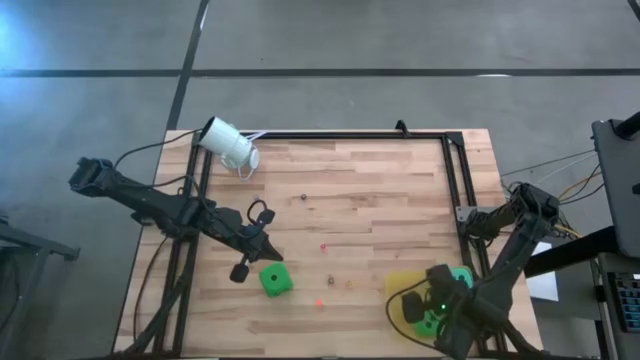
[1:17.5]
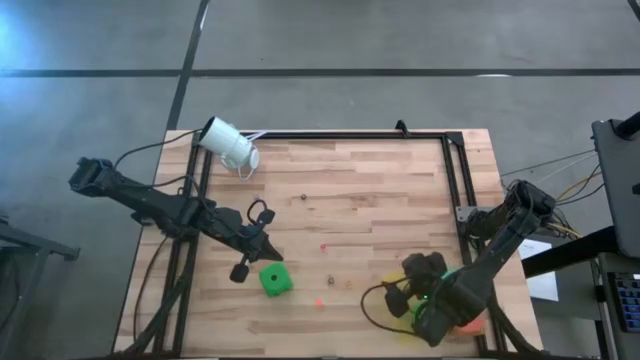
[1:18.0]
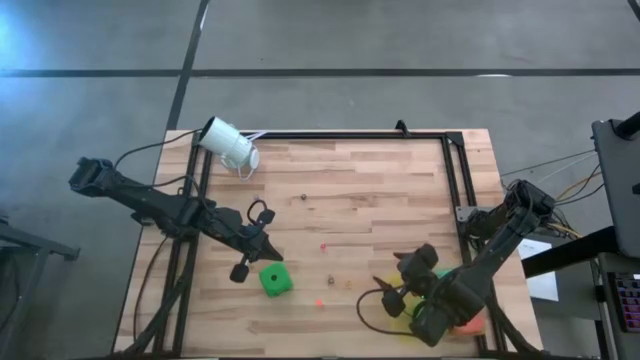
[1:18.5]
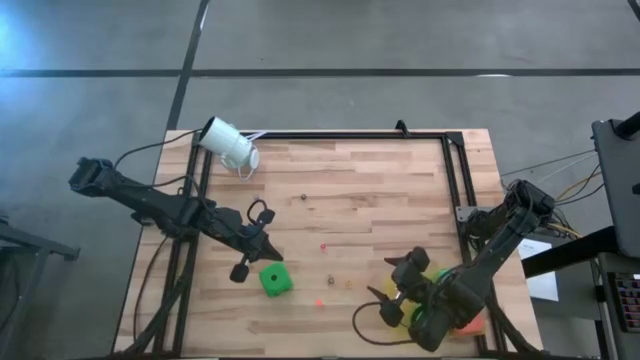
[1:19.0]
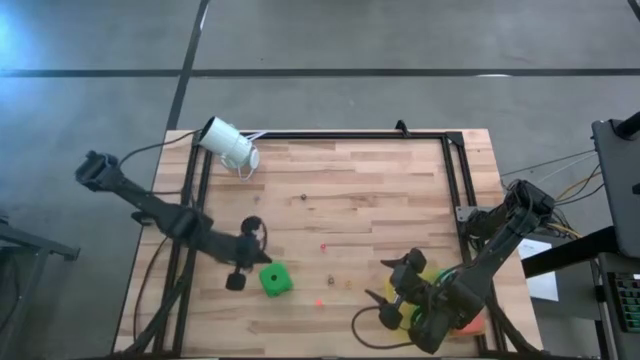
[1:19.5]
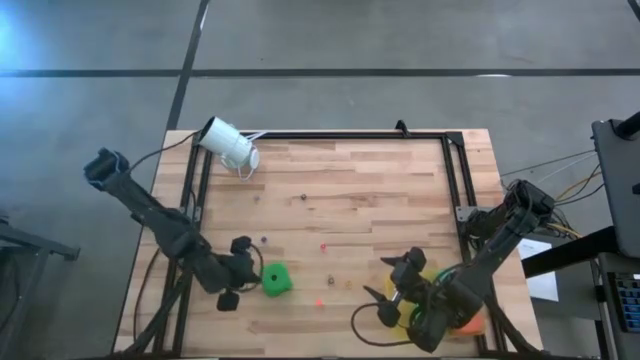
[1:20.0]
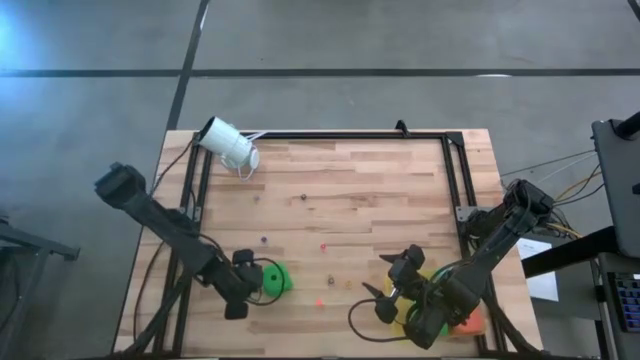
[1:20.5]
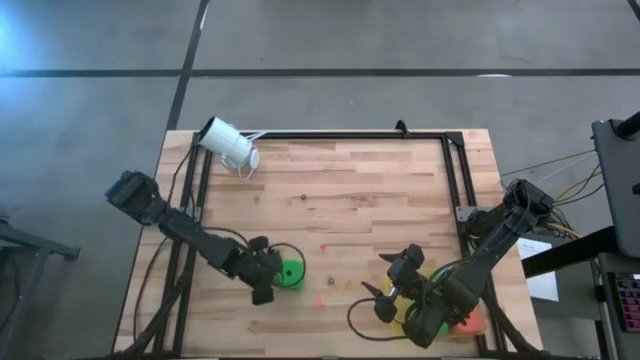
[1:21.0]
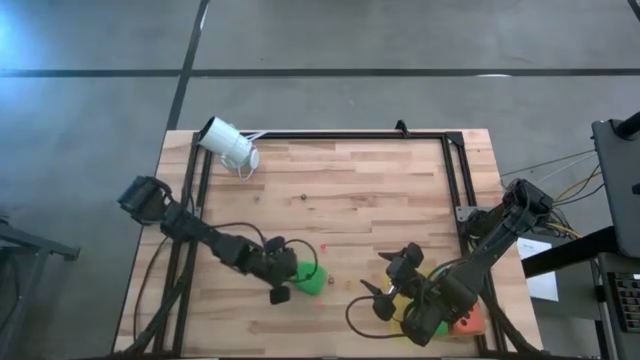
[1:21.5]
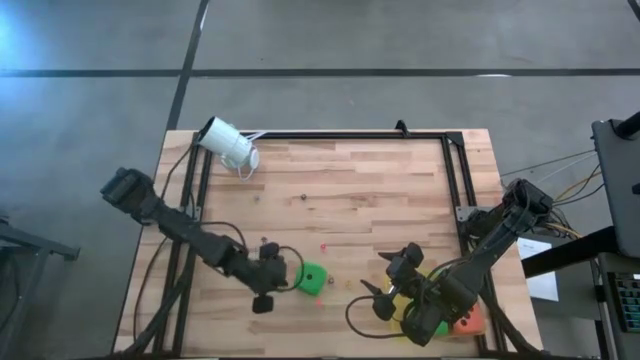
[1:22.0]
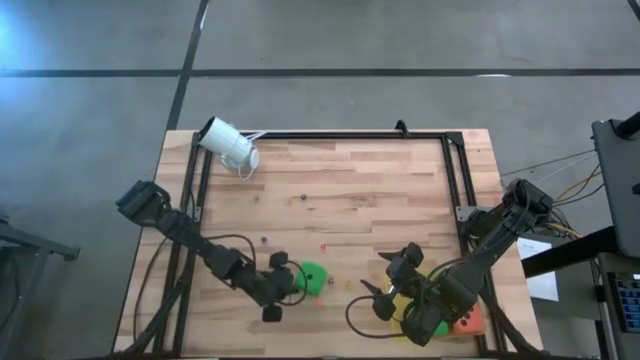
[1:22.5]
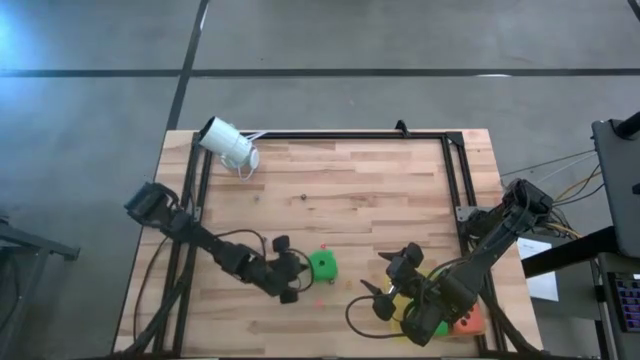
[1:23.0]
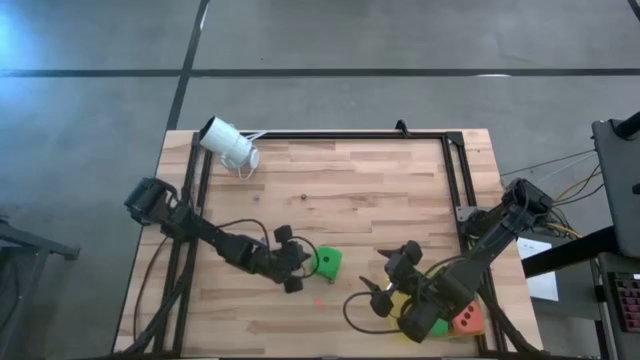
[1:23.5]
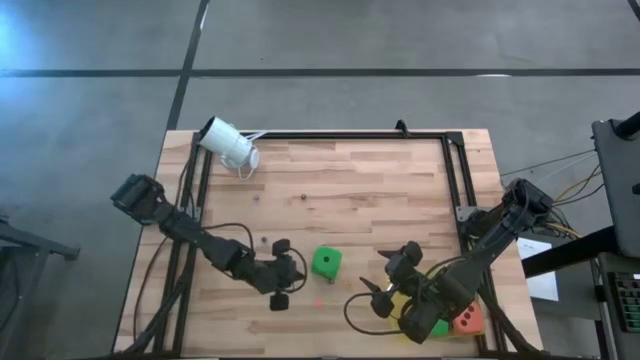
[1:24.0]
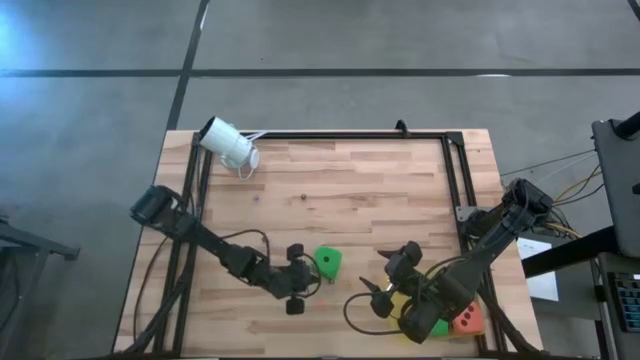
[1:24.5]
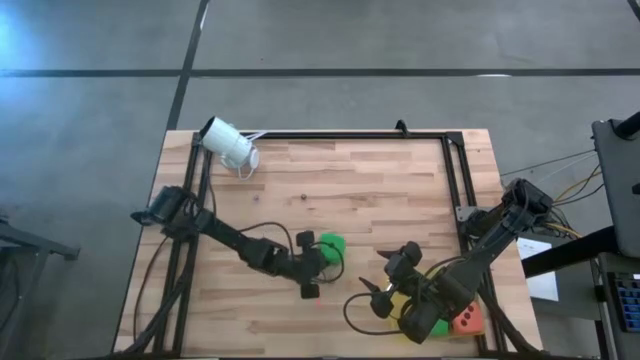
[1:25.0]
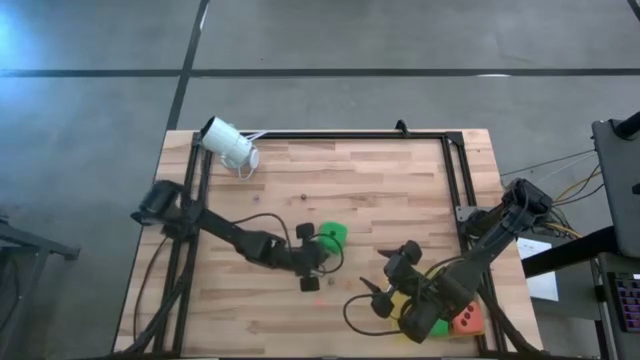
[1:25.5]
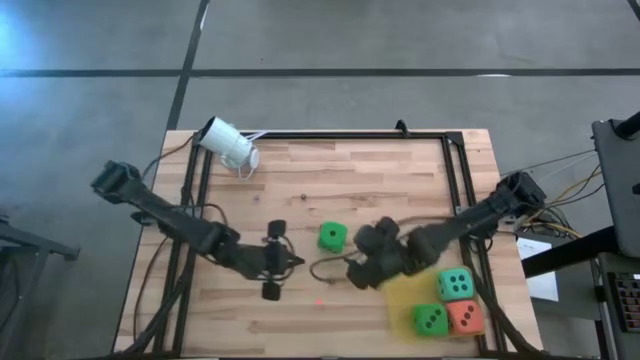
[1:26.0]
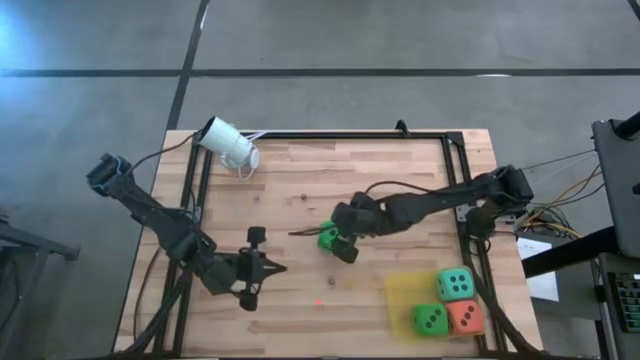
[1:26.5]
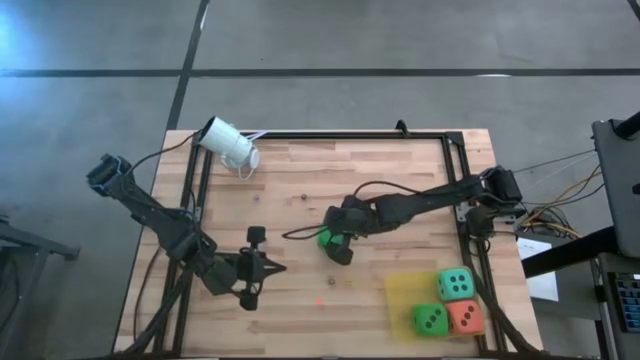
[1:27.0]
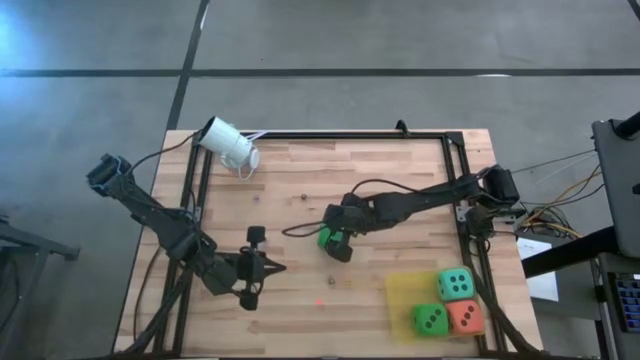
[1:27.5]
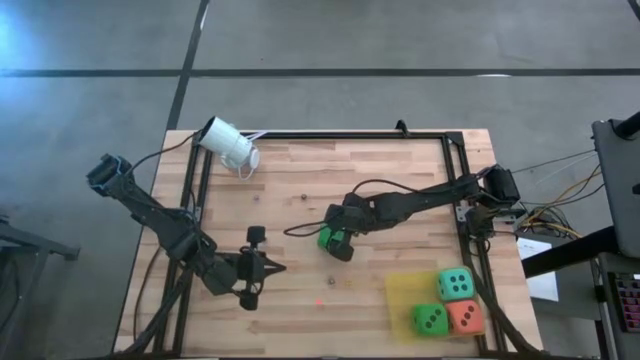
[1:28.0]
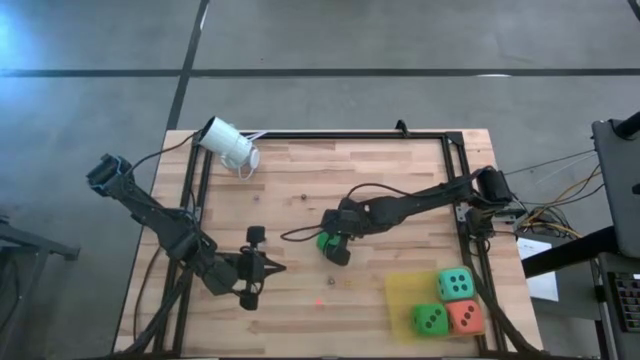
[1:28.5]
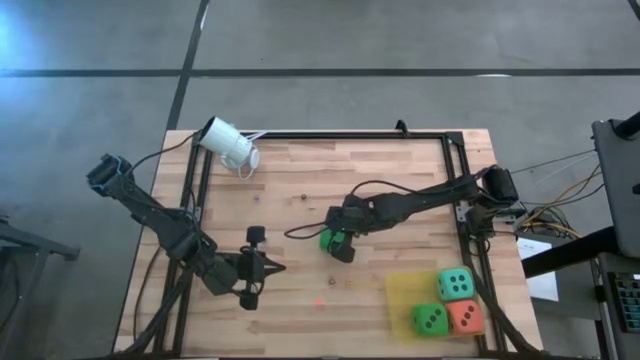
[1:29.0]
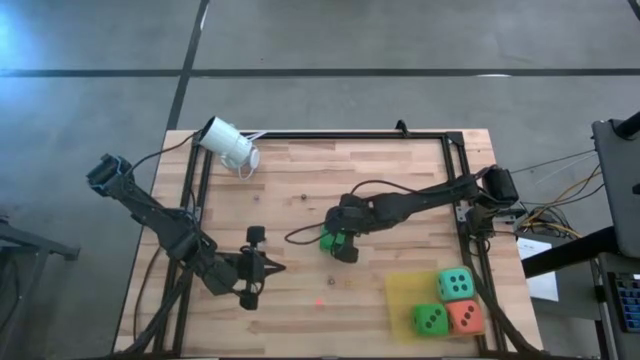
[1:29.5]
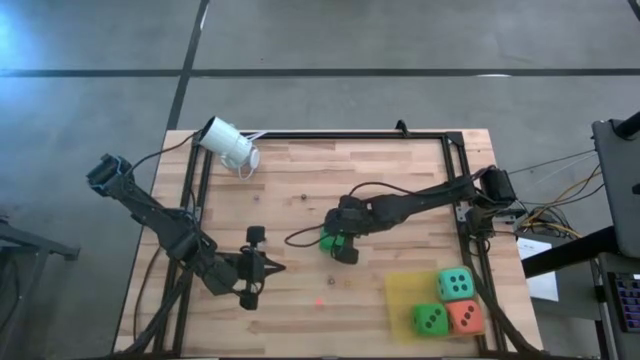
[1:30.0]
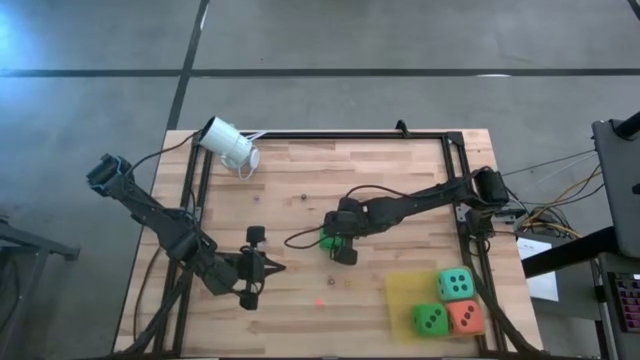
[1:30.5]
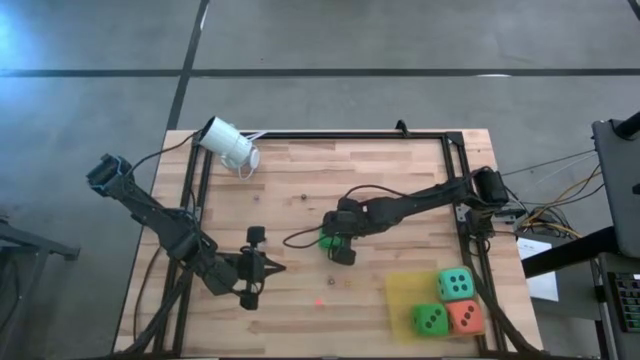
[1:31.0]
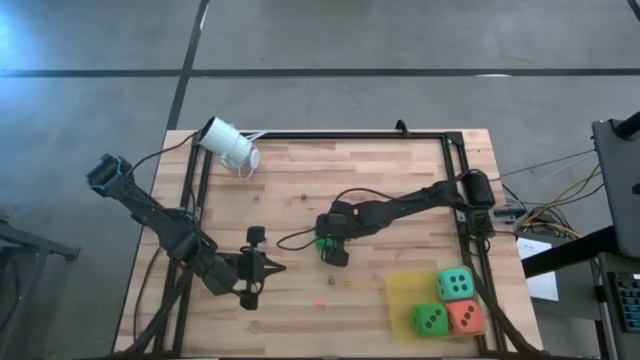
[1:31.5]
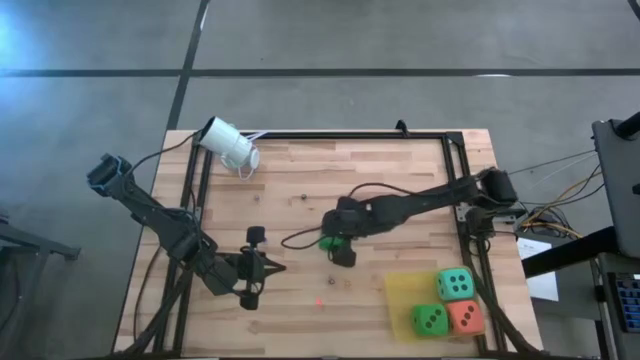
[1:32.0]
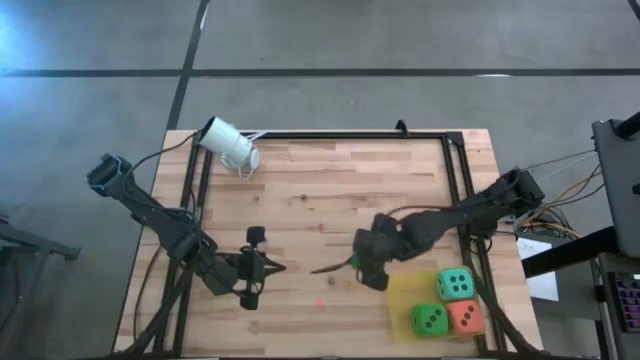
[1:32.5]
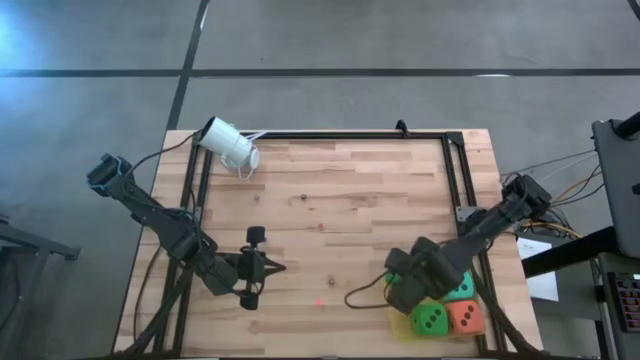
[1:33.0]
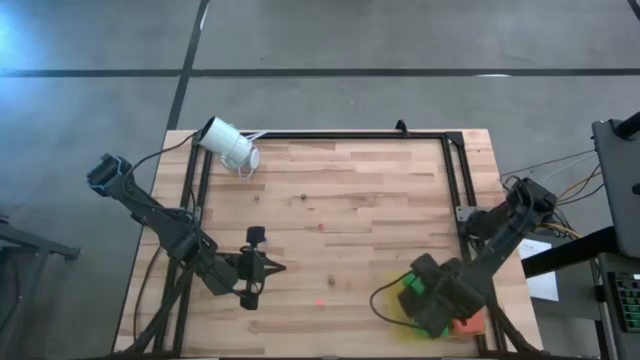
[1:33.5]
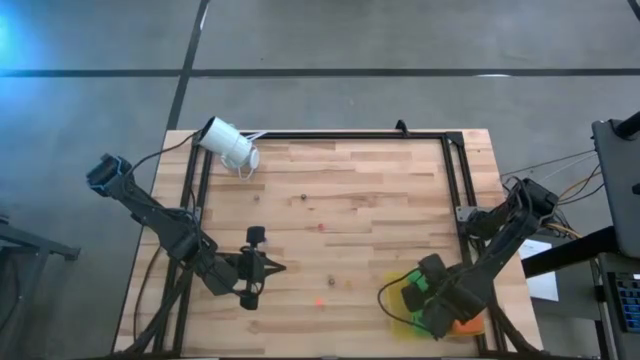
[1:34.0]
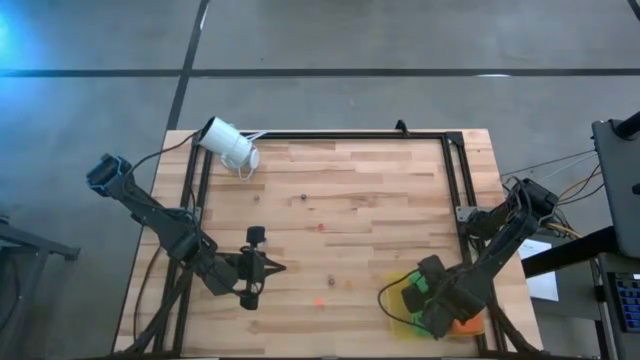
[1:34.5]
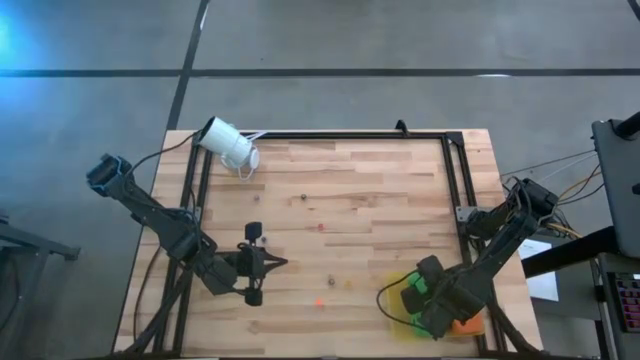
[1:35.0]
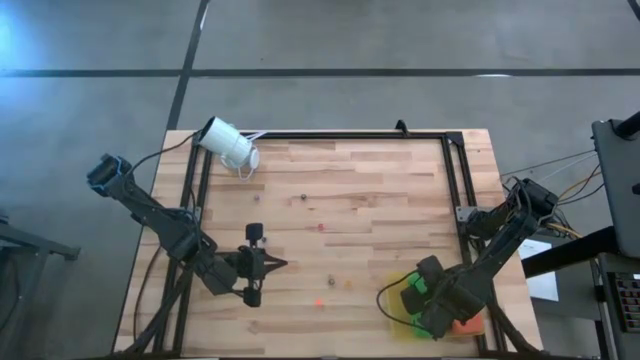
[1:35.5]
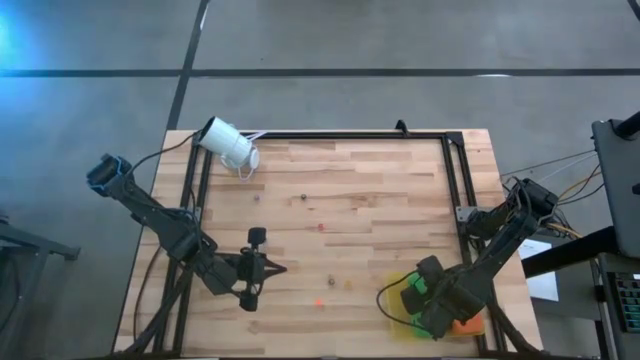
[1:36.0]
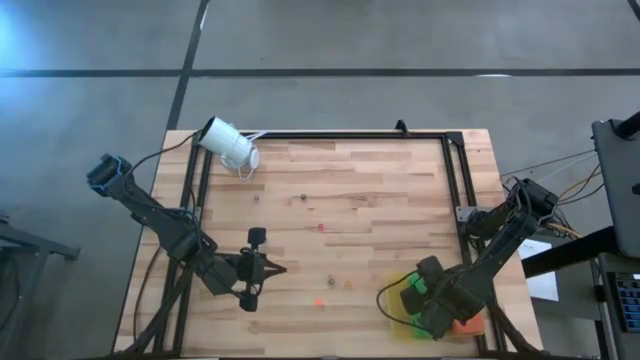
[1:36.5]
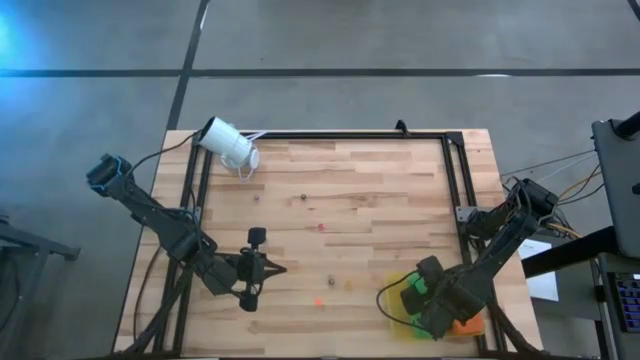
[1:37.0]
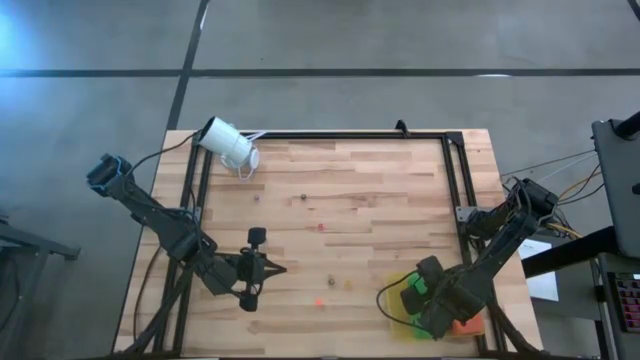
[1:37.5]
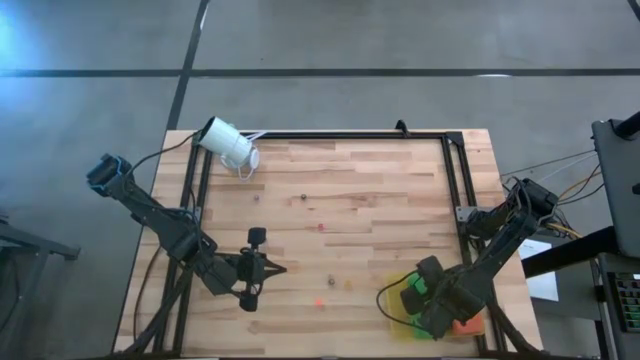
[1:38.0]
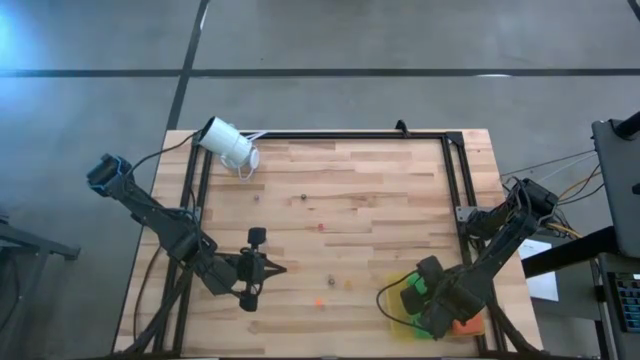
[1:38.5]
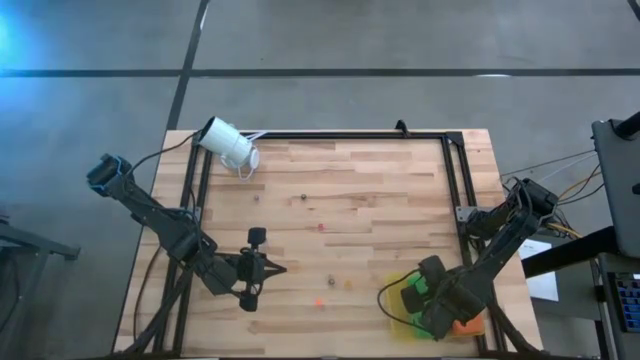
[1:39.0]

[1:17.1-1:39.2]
Task: Pick & Place Dice
Put the large green die into the yellow bin
